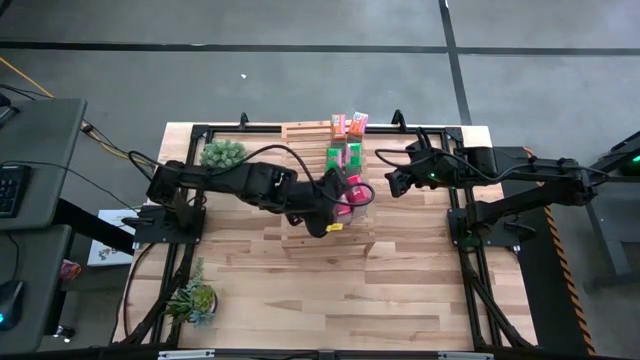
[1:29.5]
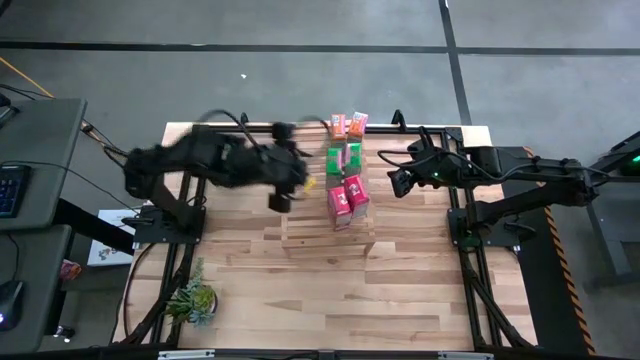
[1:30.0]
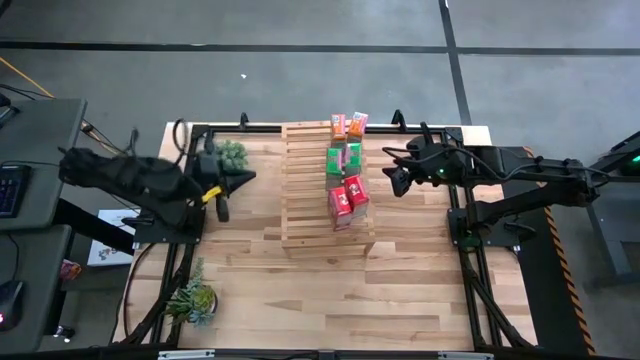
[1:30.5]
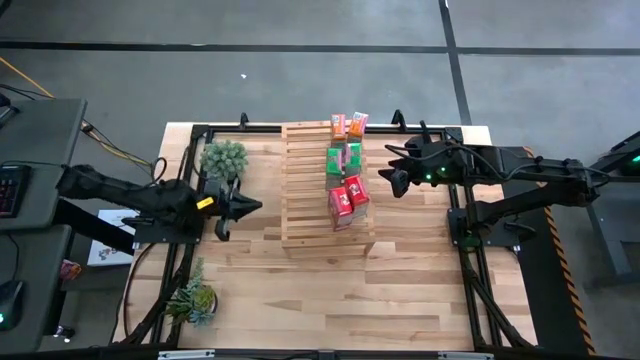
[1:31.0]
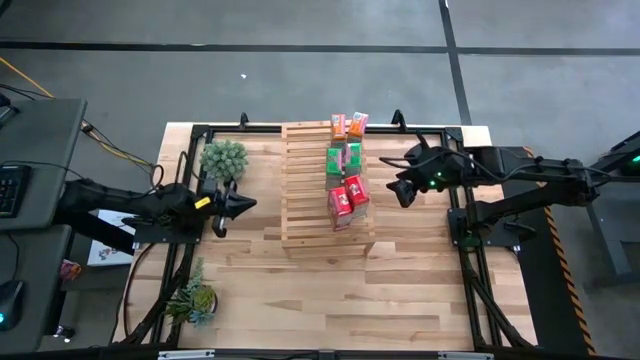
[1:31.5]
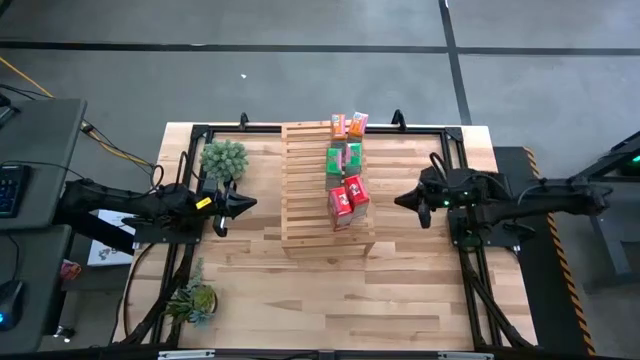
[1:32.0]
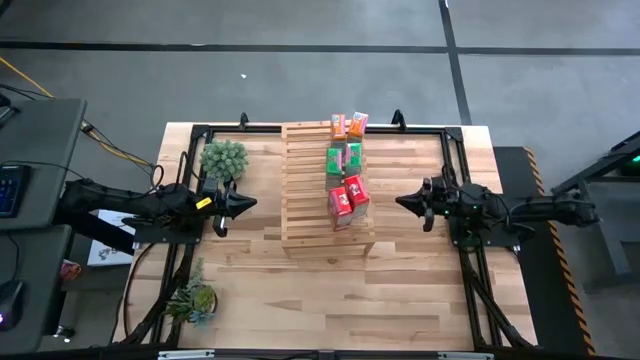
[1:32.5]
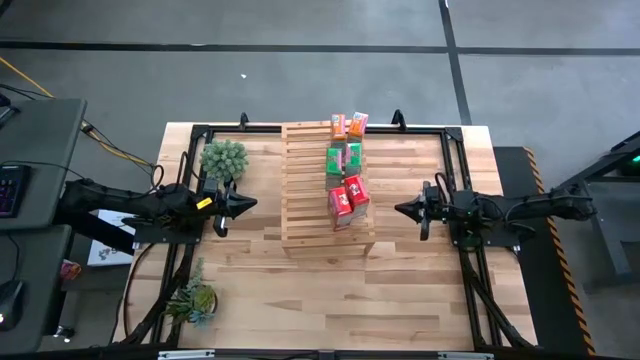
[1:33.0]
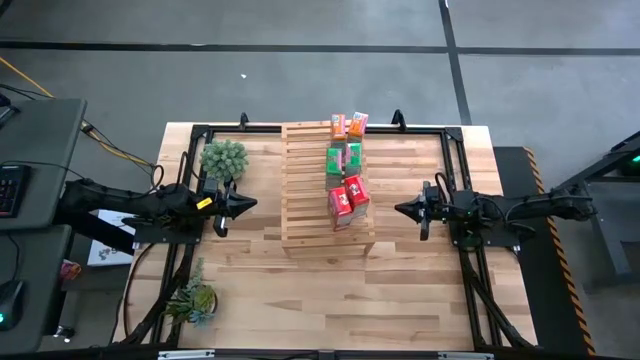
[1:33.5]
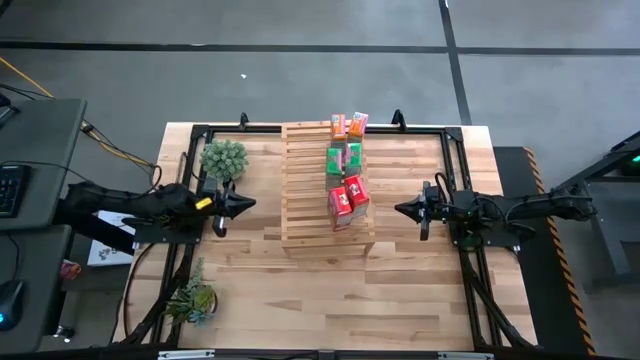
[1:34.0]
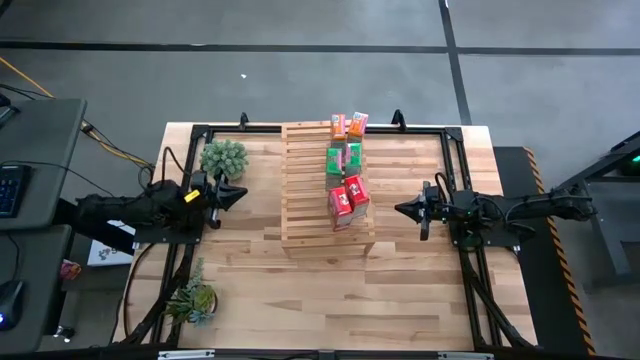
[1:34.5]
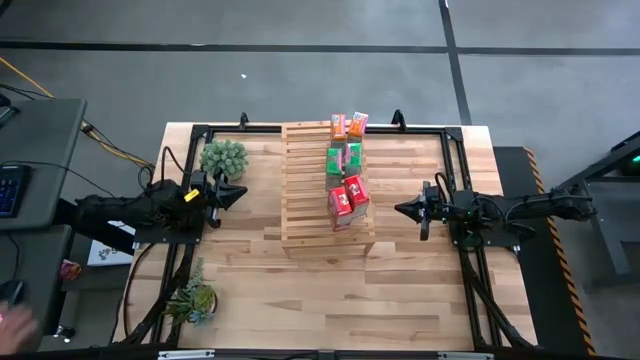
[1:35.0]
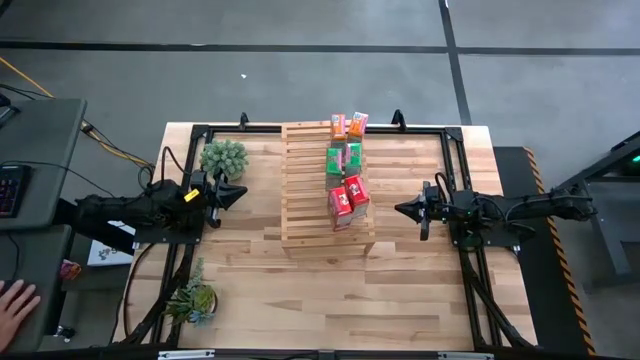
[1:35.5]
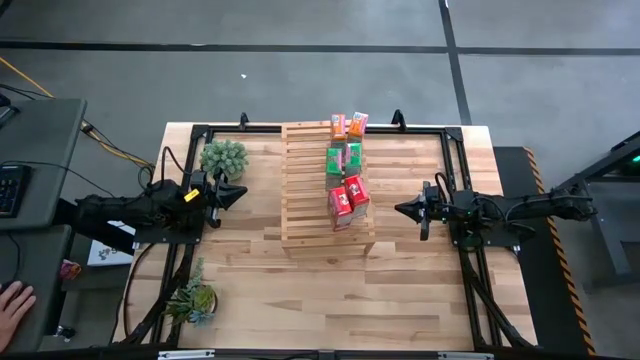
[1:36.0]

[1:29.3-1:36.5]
Task: Stack cereal on shelf
Return to Home Position

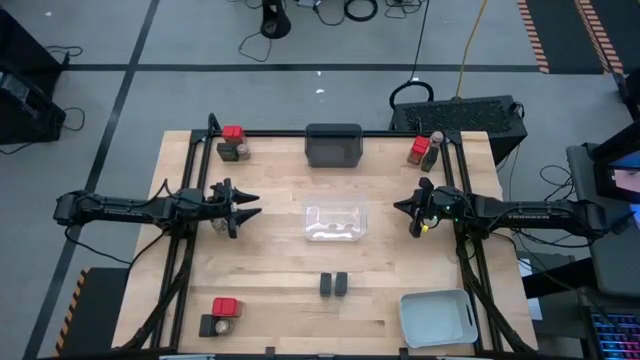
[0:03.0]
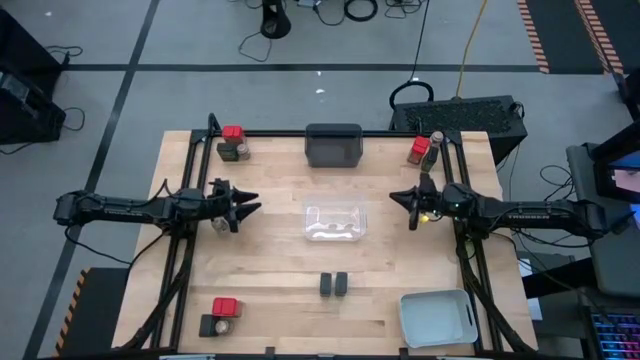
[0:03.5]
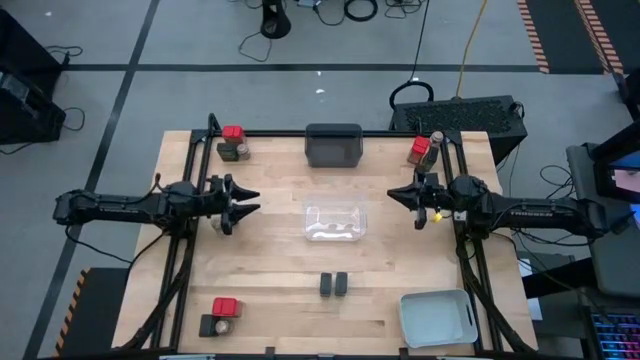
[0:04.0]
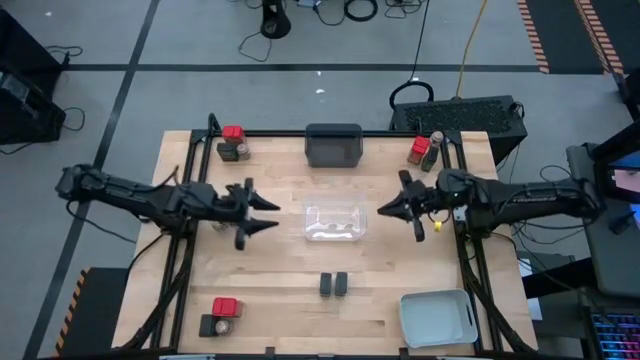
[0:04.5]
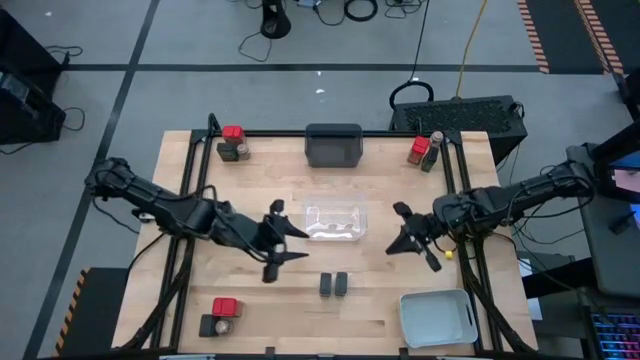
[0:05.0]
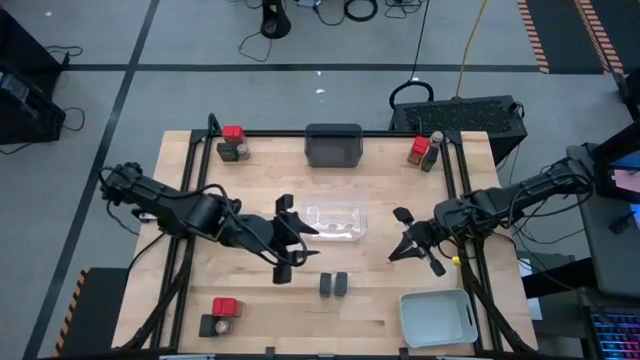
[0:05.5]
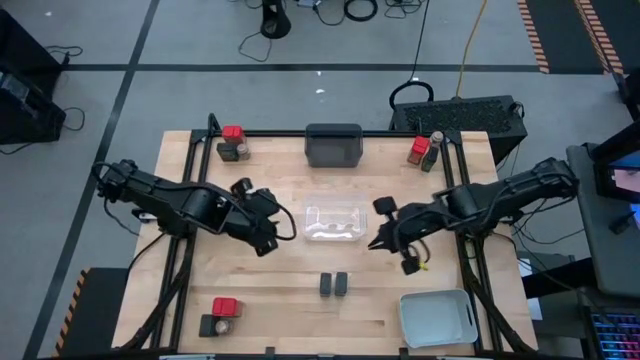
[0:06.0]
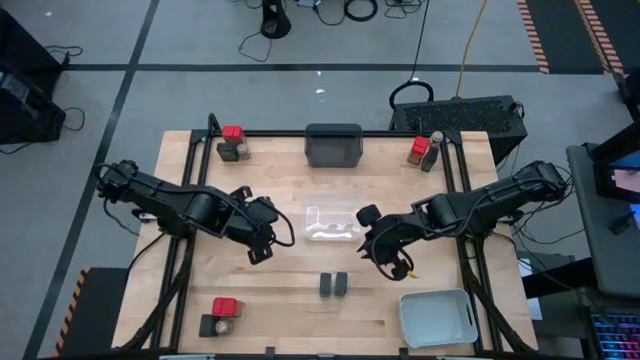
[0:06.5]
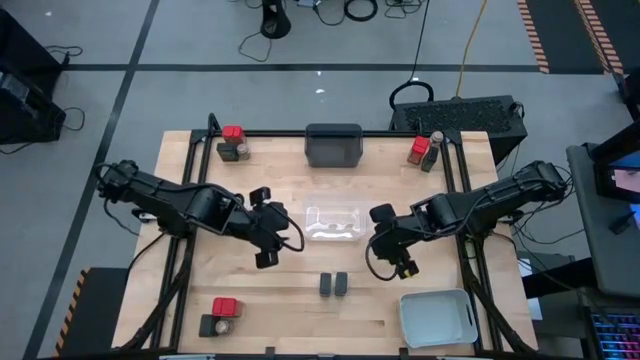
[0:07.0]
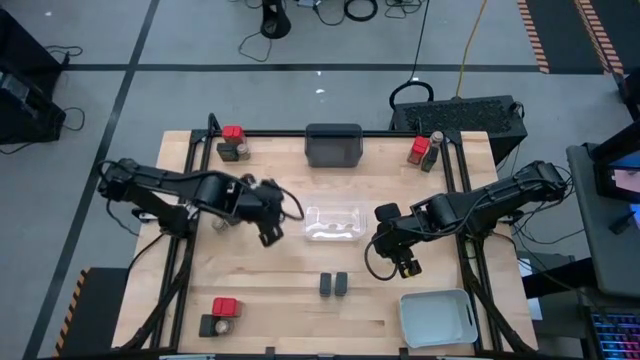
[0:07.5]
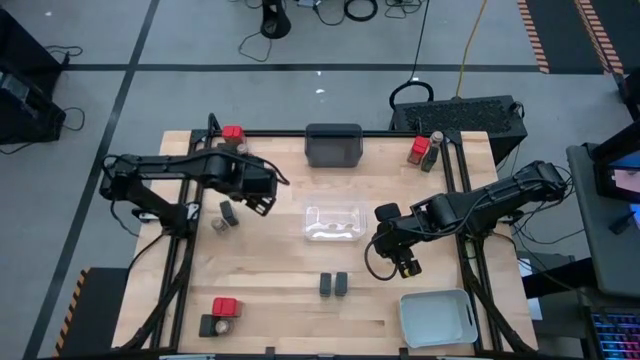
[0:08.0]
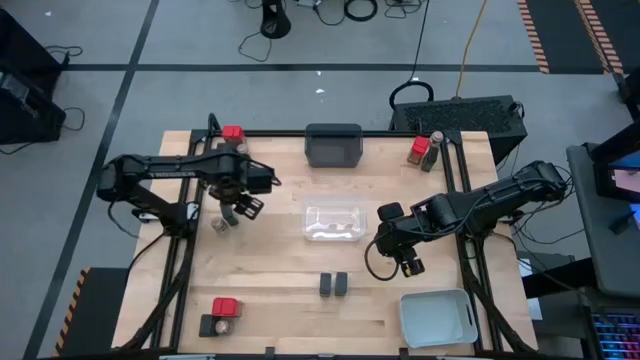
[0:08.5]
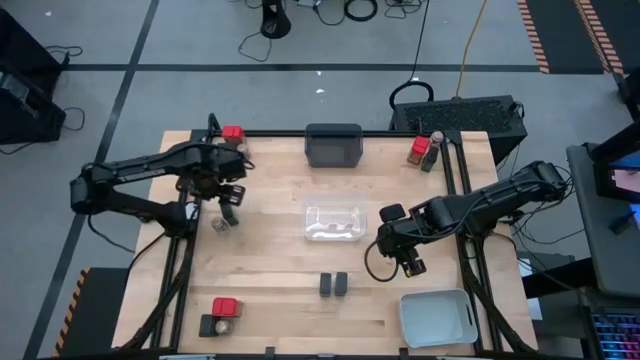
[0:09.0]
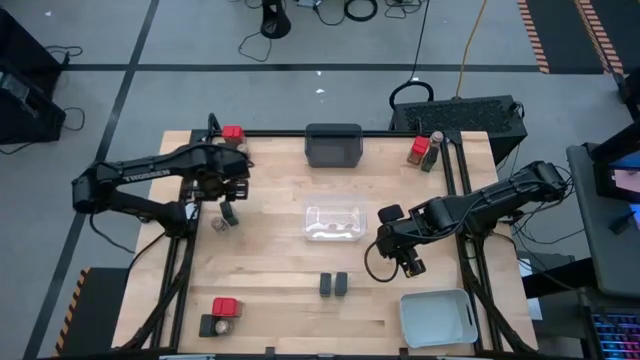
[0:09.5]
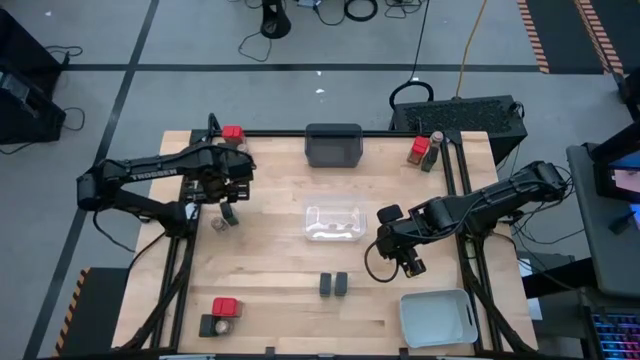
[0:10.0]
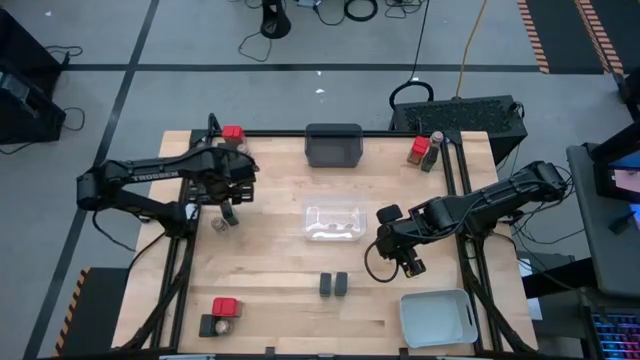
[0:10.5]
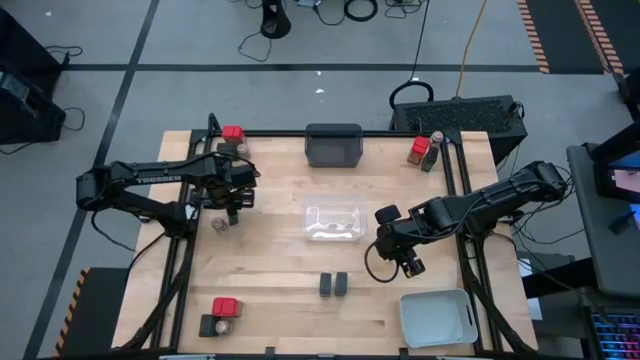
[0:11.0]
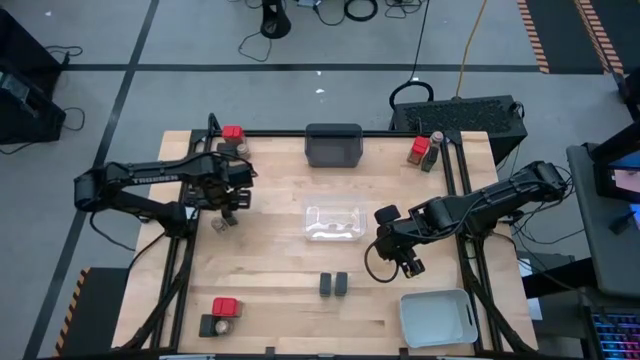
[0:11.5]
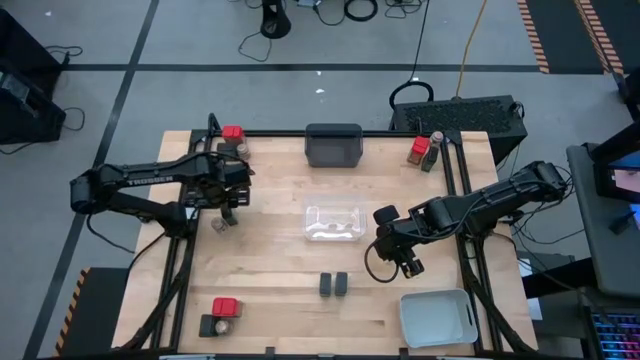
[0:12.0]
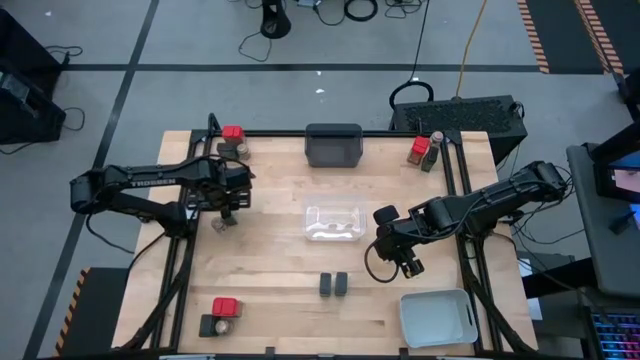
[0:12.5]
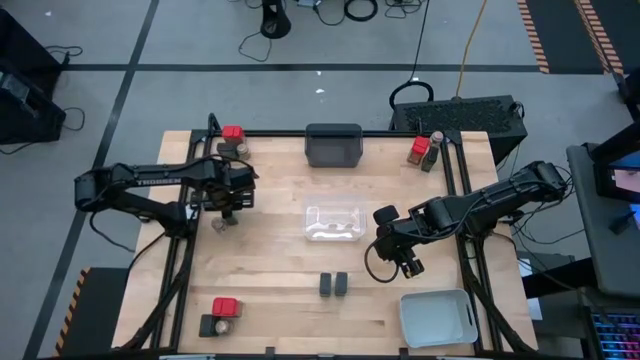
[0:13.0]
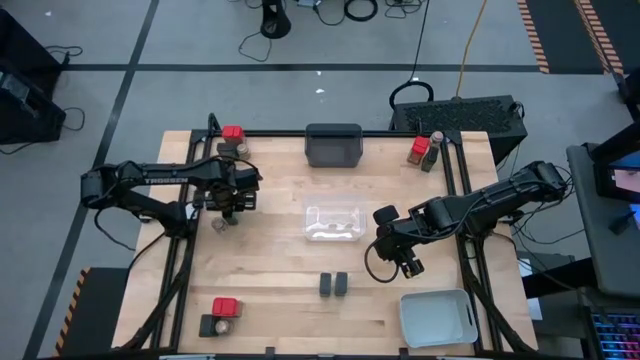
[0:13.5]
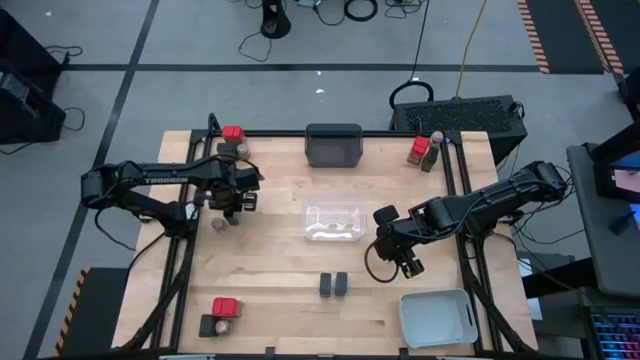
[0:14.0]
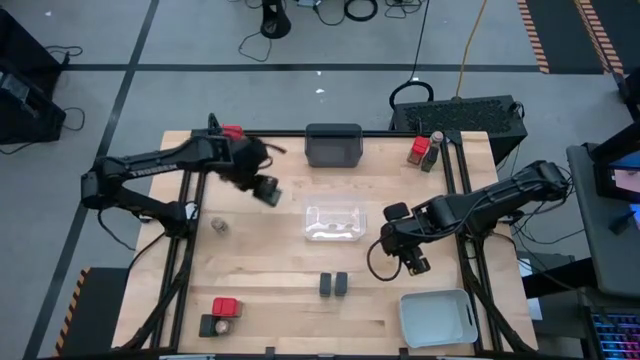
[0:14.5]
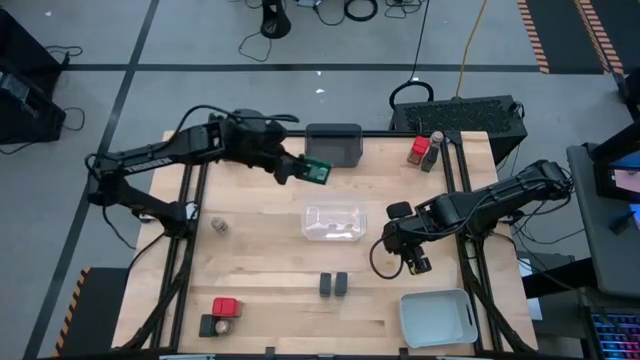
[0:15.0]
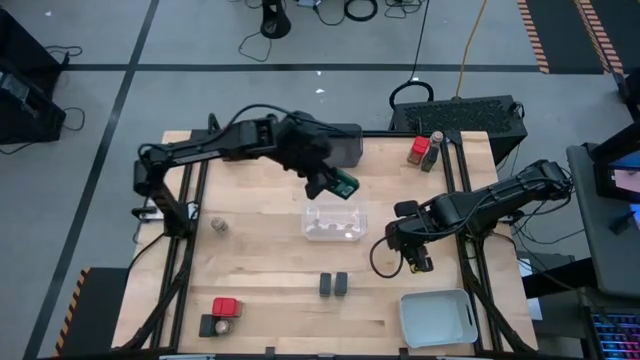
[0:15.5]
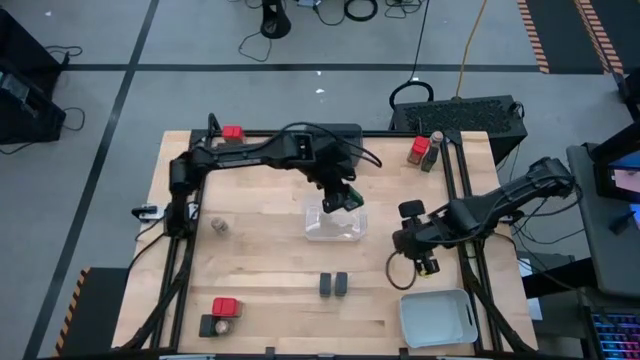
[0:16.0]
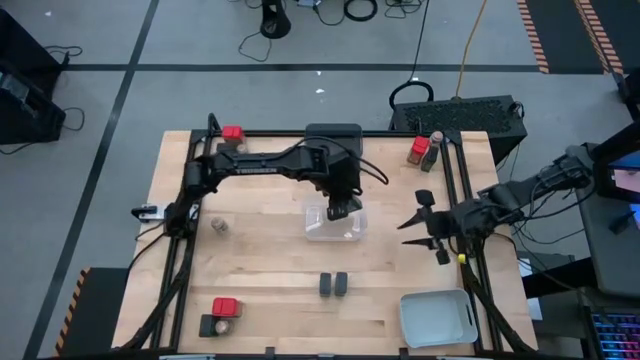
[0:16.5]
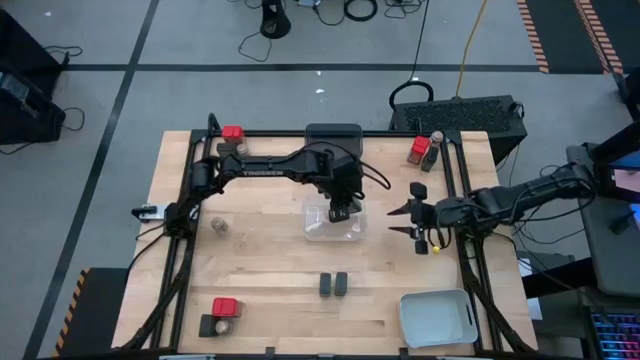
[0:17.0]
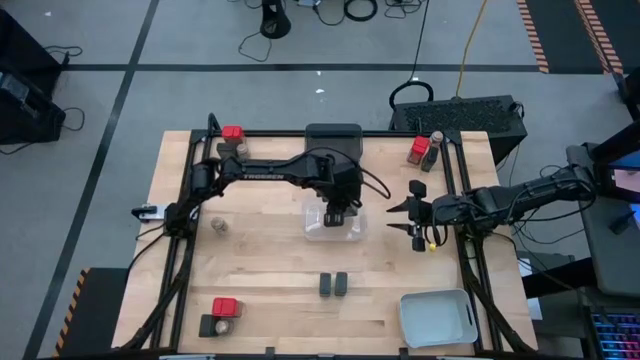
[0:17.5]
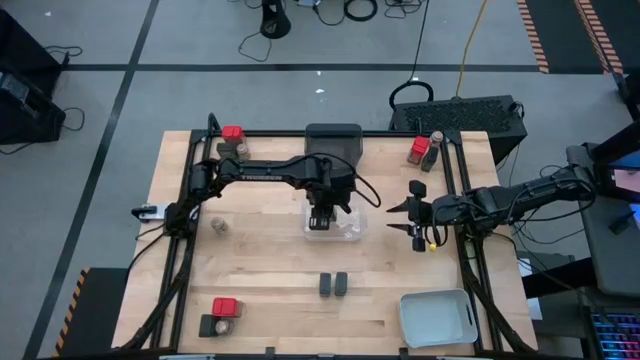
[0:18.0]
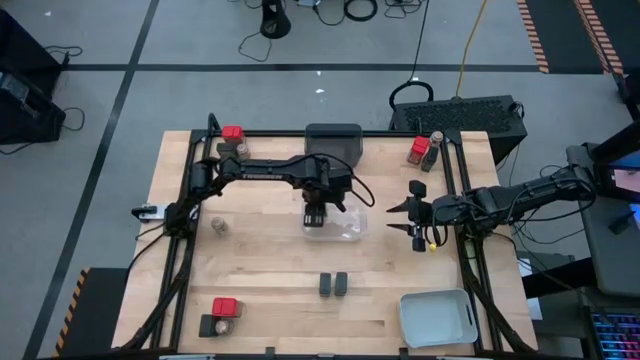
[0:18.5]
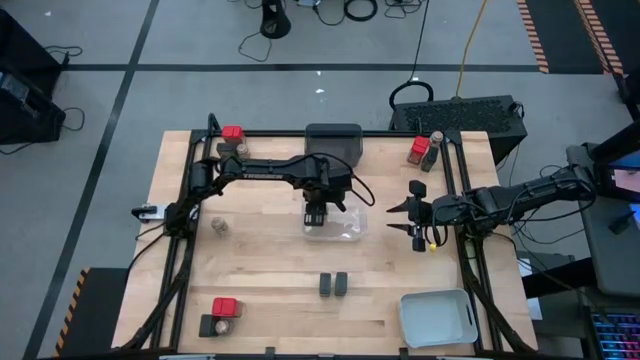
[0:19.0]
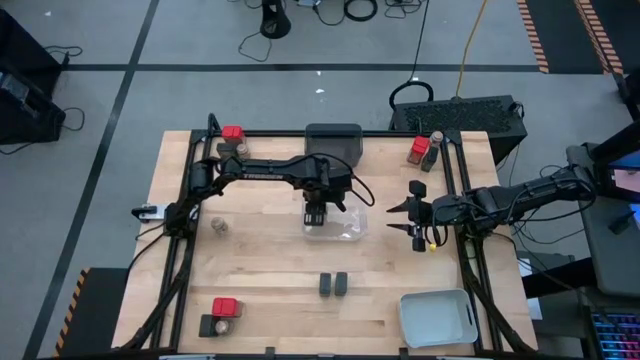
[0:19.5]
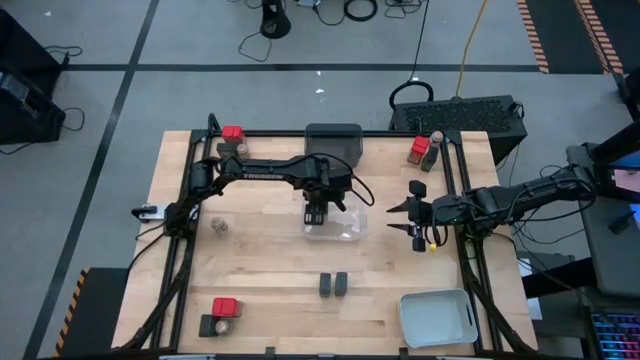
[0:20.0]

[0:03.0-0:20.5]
Task: Sort spices by type
Put the green seasoning bottle into the transparent bin
